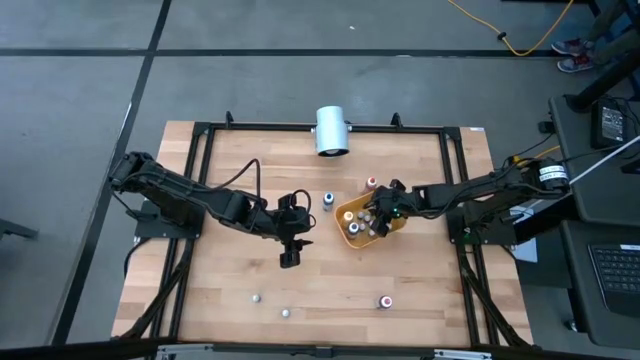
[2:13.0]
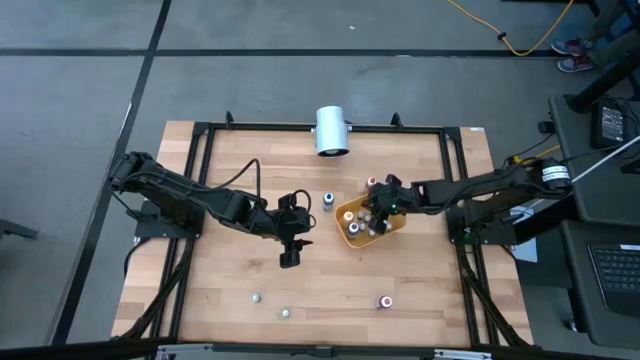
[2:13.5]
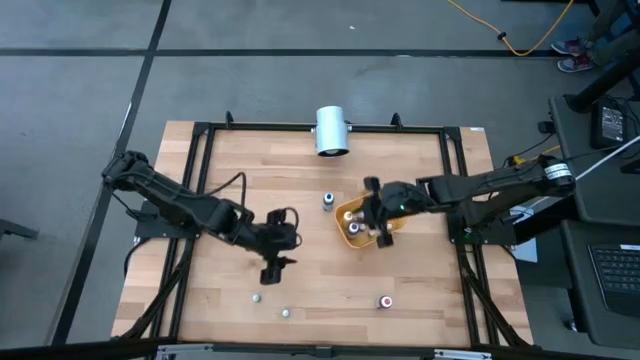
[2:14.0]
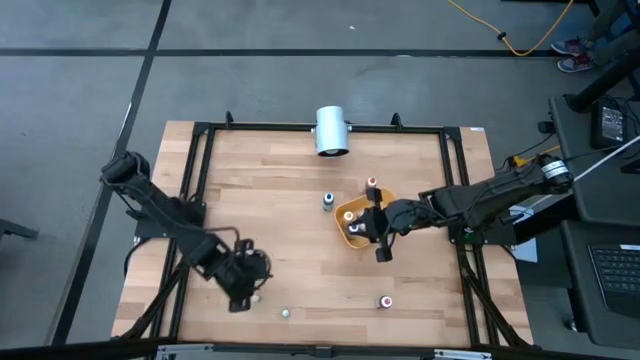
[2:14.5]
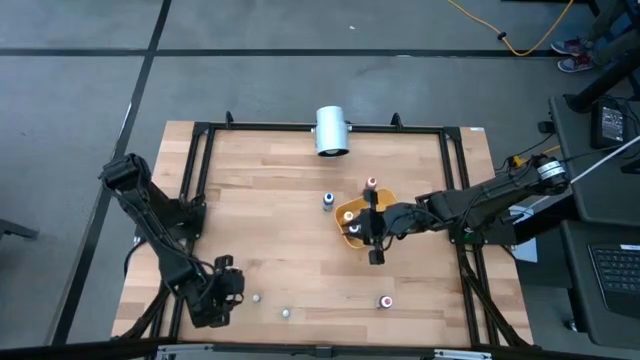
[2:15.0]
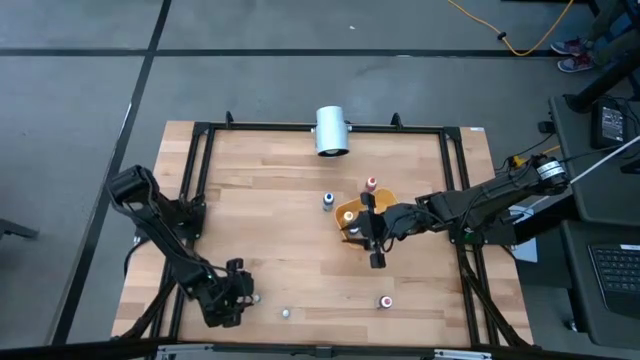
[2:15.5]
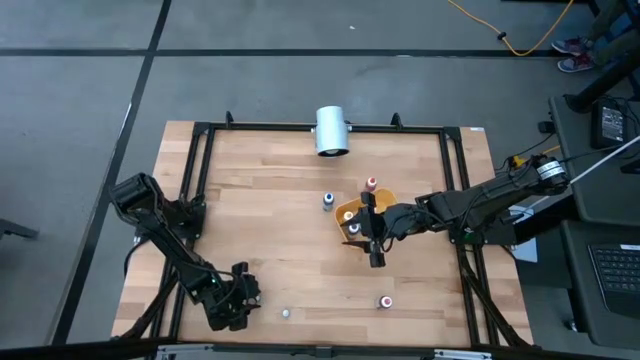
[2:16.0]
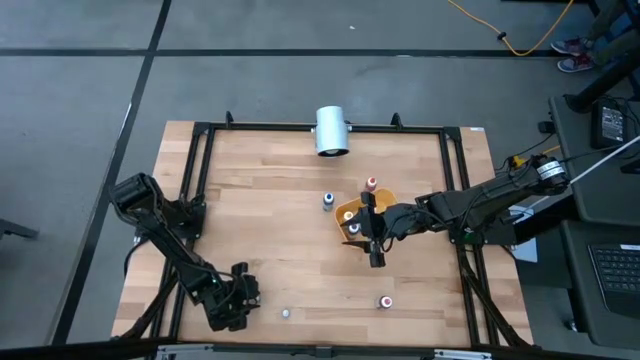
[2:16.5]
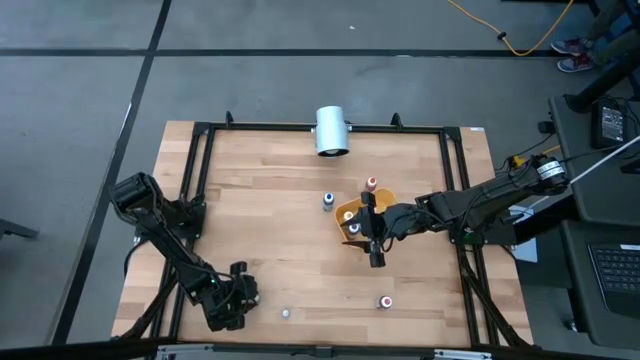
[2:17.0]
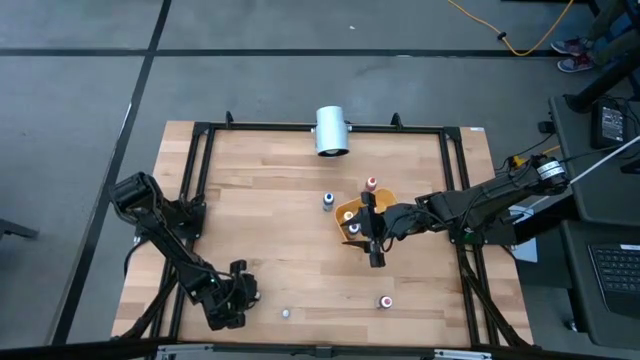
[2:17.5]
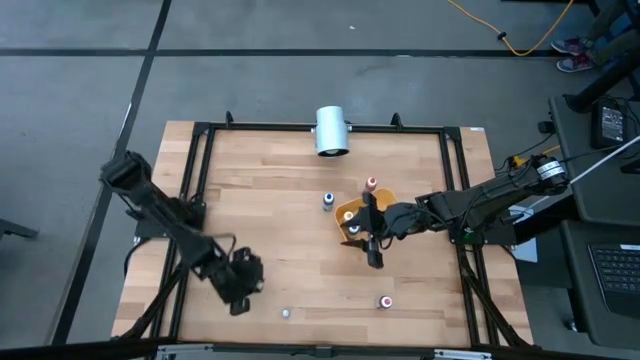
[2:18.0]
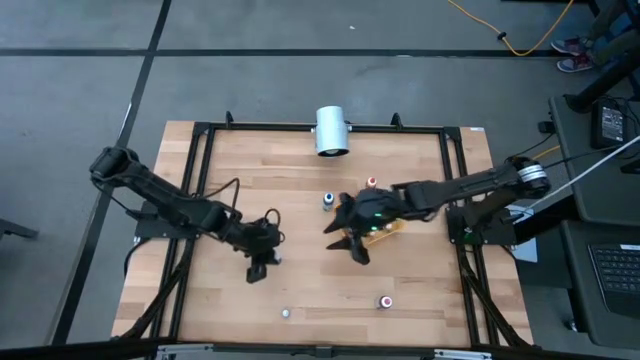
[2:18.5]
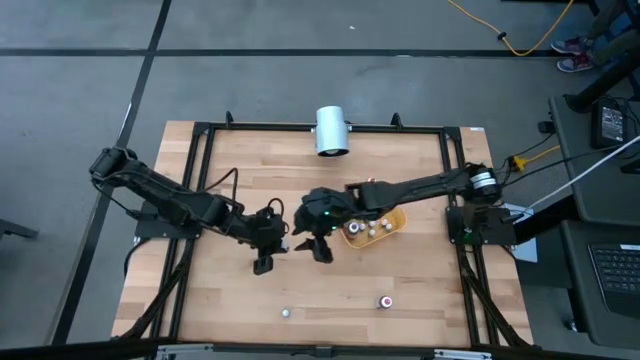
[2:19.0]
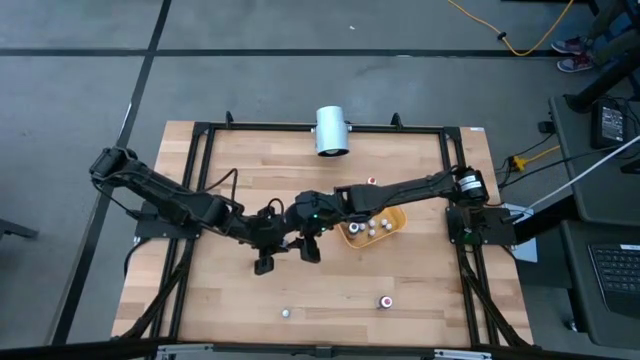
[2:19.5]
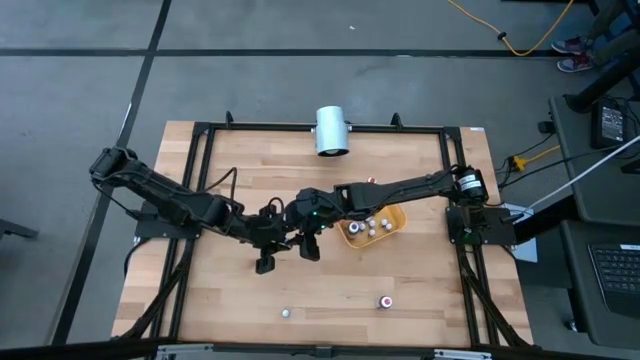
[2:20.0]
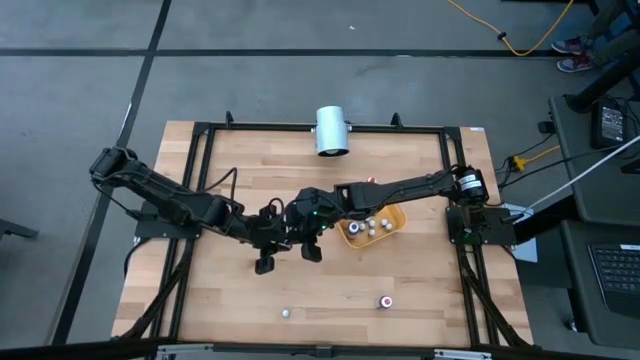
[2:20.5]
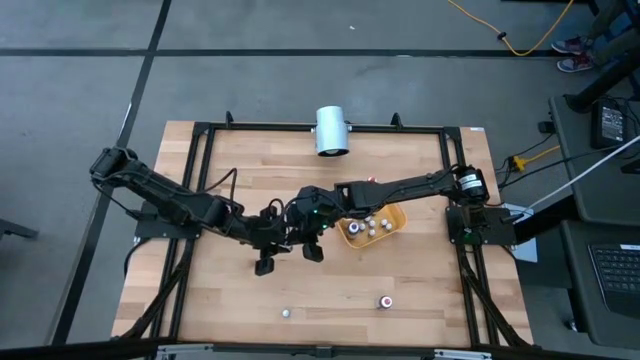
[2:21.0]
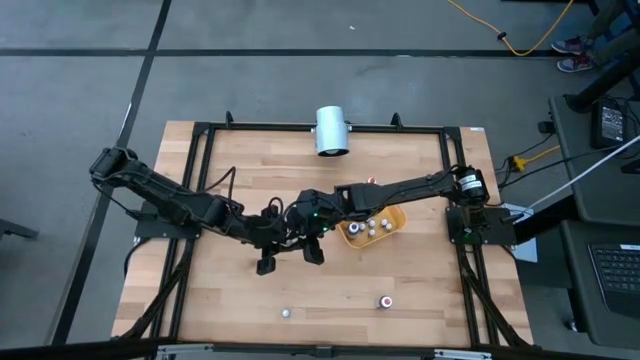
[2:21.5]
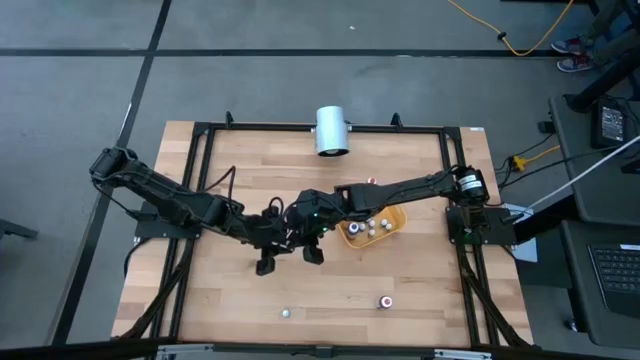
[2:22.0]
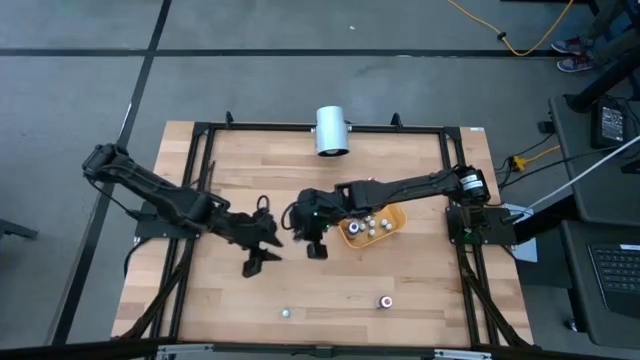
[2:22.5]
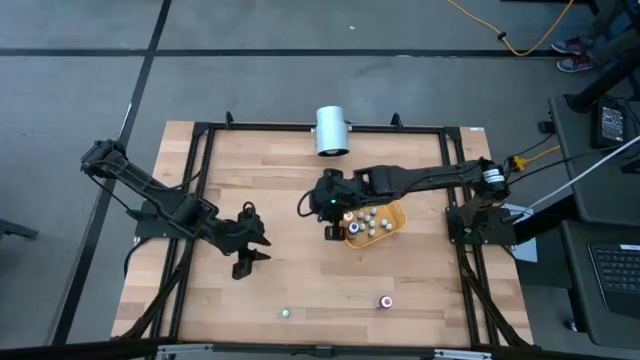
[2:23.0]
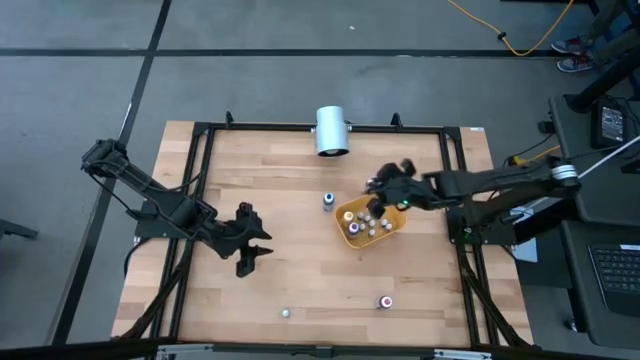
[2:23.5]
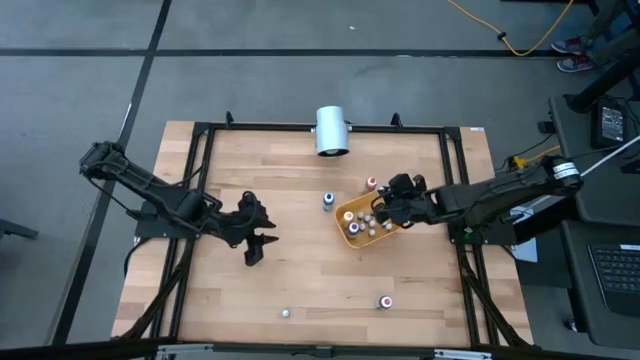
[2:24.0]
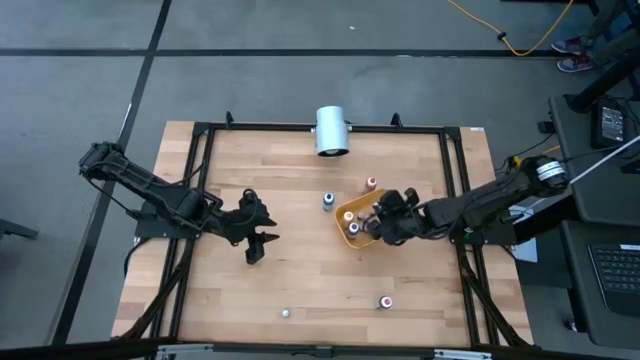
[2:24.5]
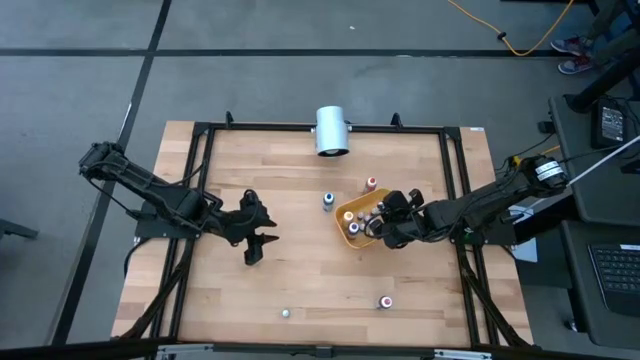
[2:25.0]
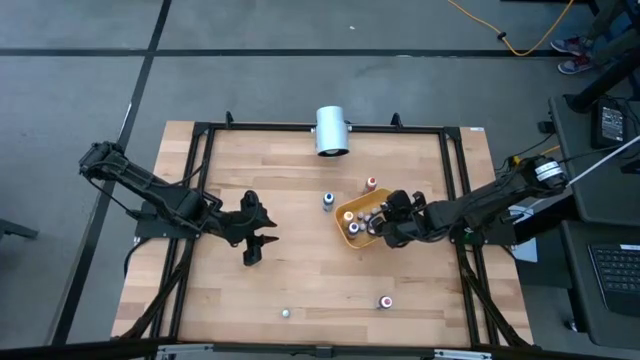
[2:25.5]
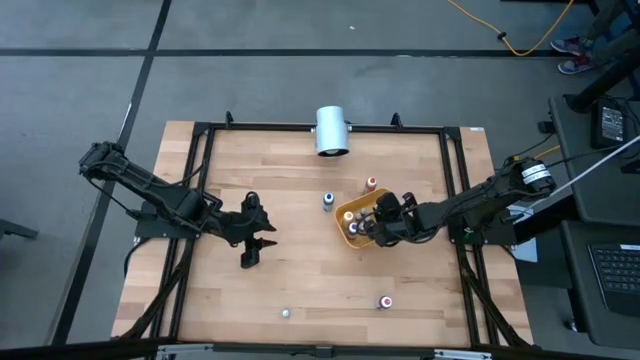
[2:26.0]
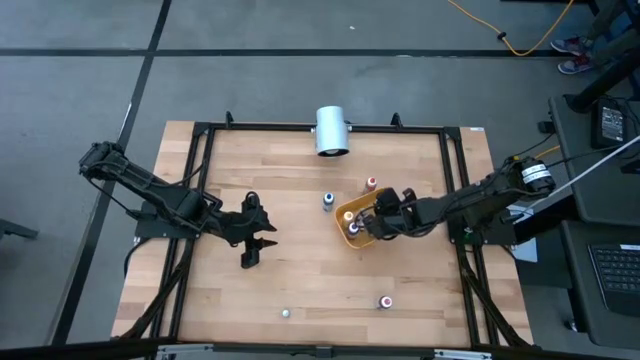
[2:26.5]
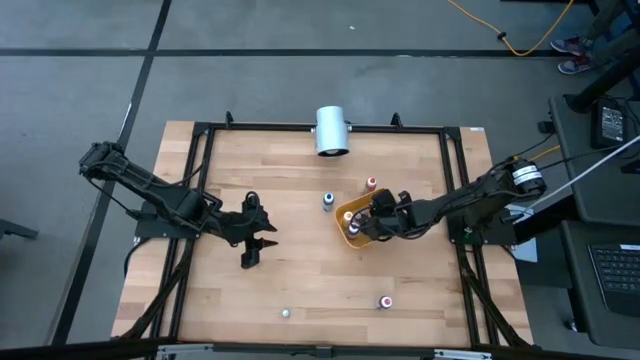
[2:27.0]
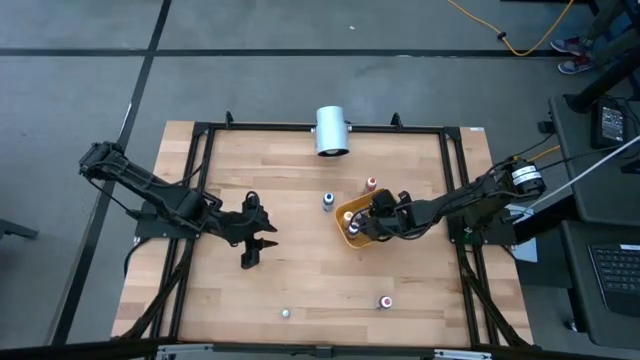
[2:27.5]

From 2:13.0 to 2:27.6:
Task: Pick & Place food coloring
Put the small blue food coloring bottle into the yellow bin

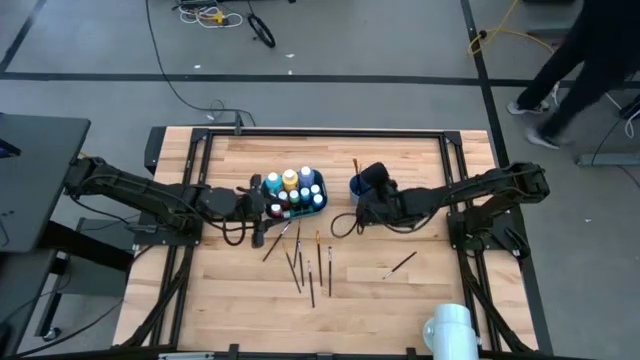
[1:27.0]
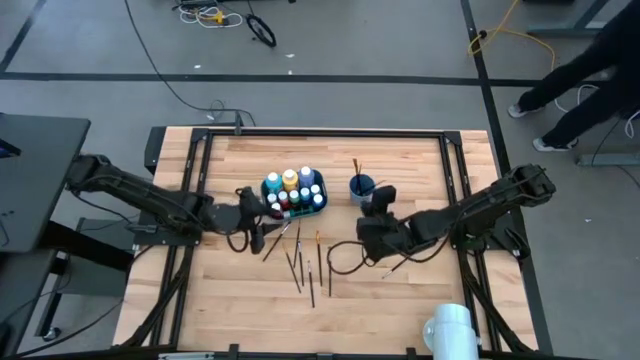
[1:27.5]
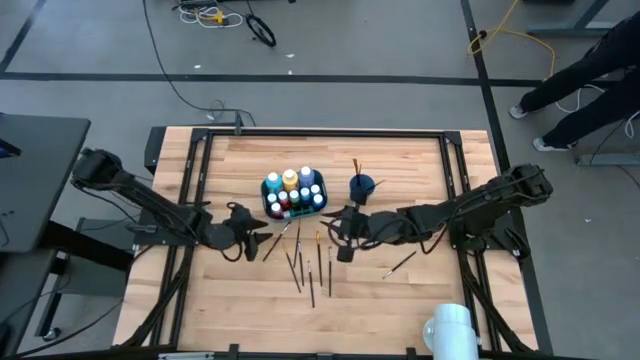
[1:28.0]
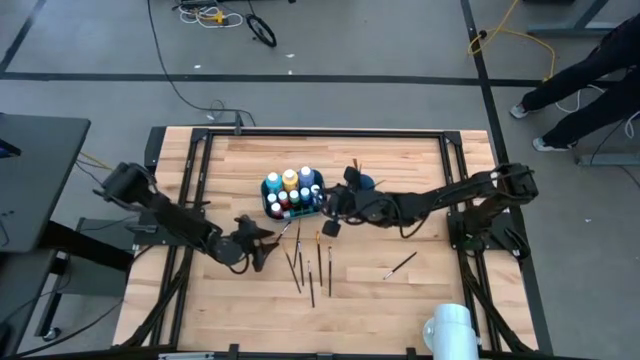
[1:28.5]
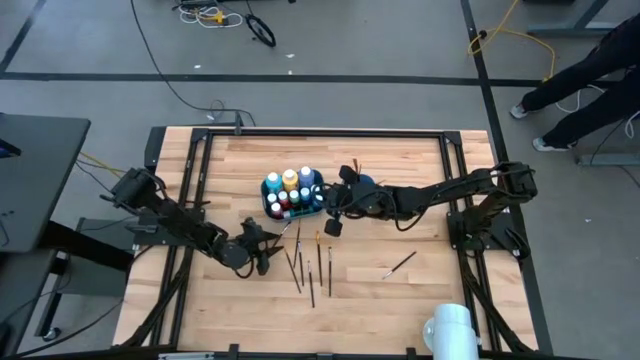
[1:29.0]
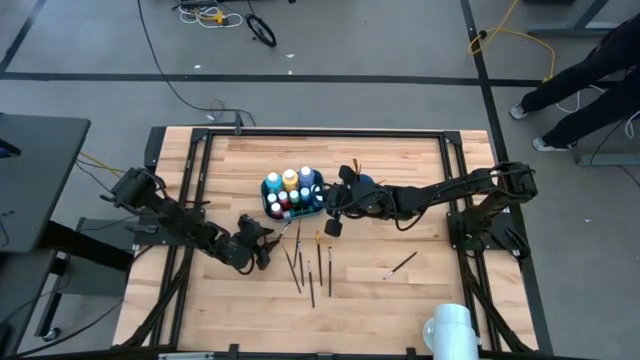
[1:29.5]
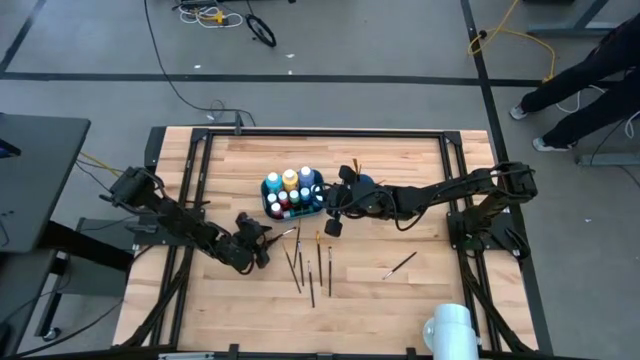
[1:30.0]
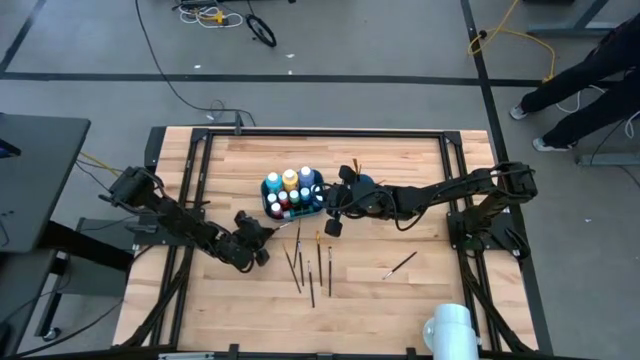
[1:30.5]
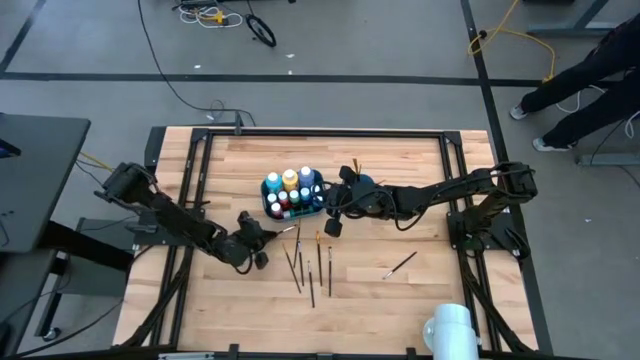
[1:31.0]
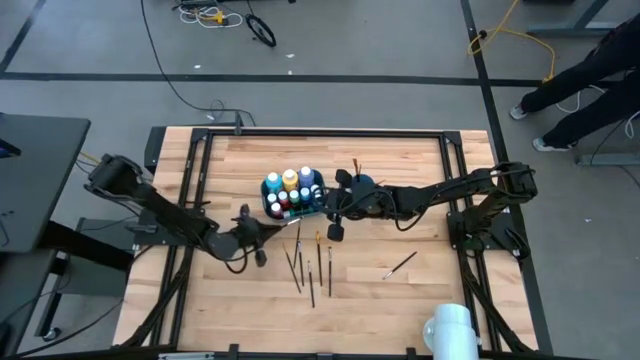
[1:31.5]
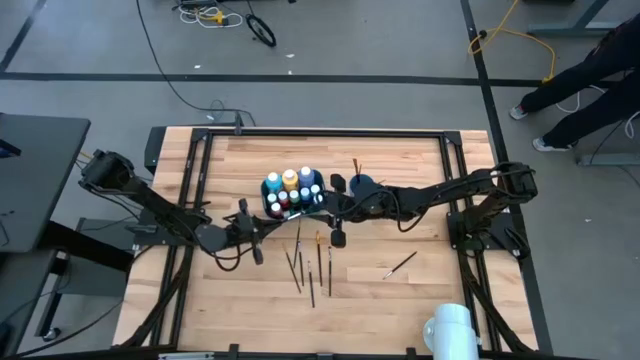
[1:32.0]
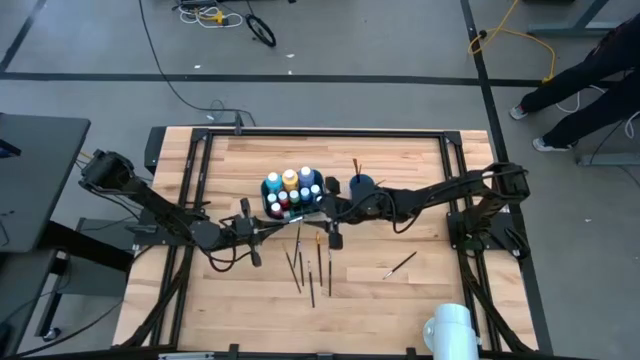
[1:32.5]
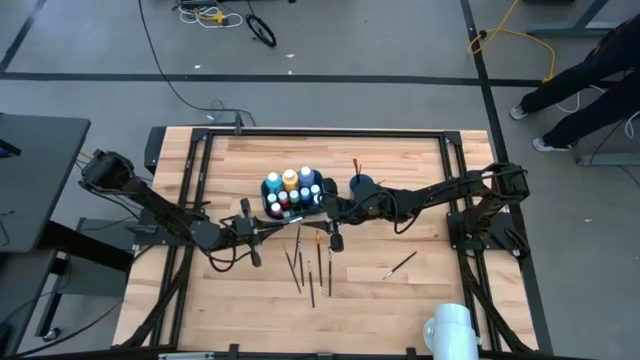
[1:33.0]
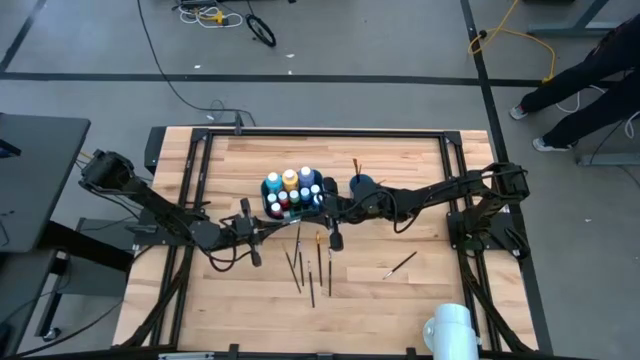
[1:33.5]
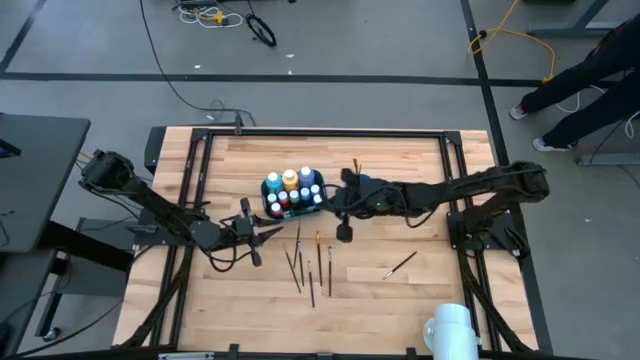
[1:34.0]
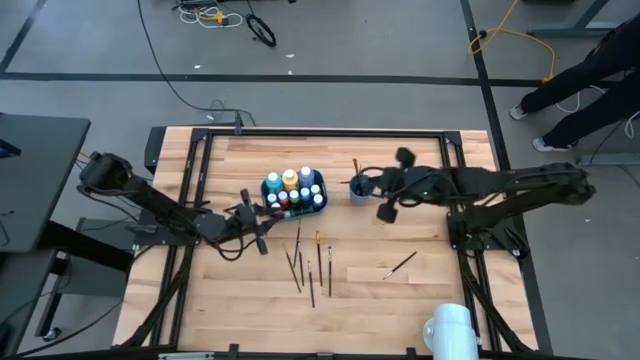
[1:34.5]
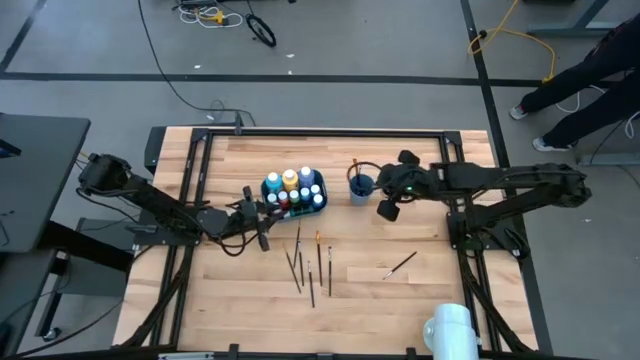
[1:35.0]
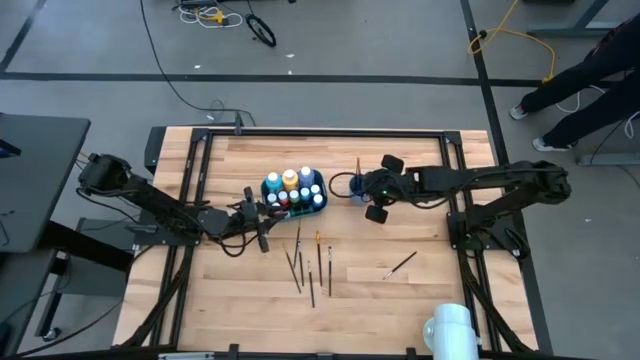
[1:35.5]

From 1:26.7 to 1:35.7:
Task: Pick & Place Paint Supplies
Put the silver paint brush into the blue cup
